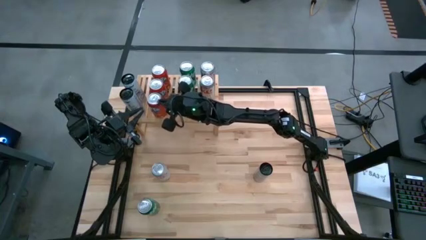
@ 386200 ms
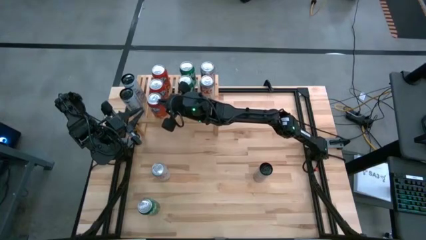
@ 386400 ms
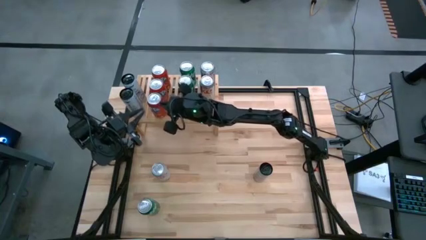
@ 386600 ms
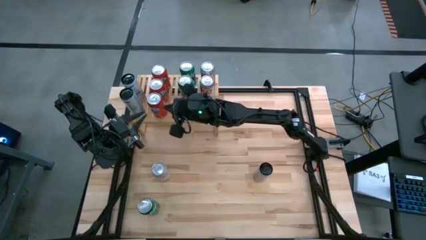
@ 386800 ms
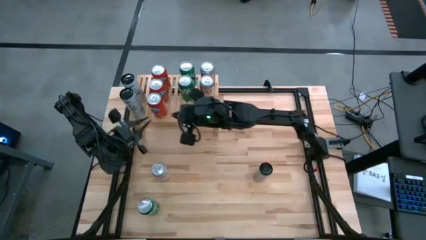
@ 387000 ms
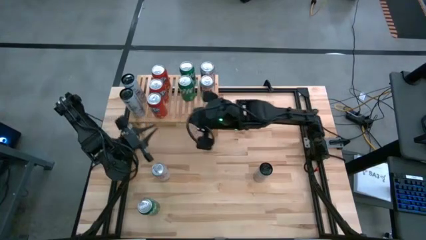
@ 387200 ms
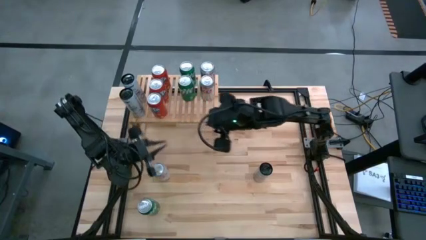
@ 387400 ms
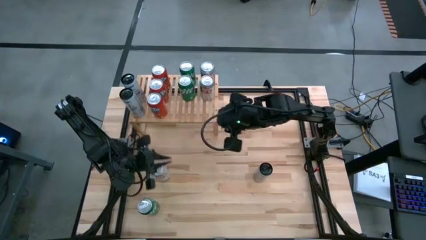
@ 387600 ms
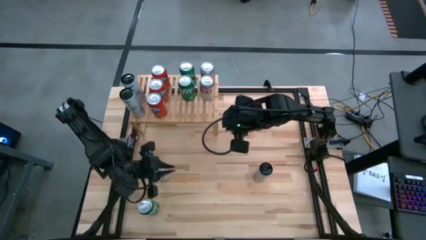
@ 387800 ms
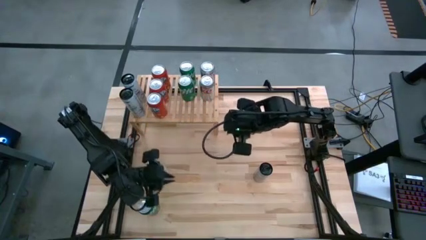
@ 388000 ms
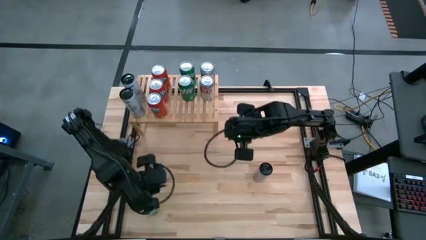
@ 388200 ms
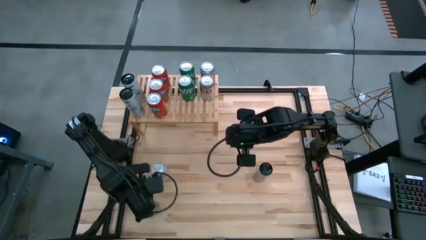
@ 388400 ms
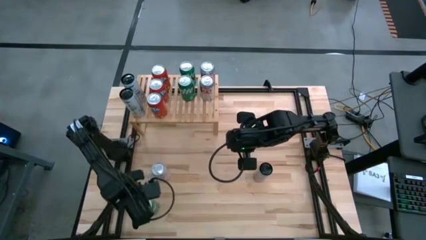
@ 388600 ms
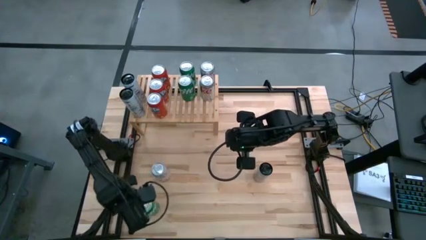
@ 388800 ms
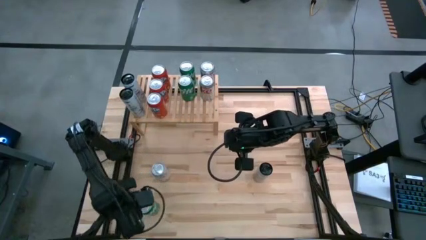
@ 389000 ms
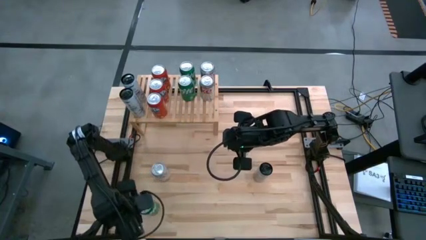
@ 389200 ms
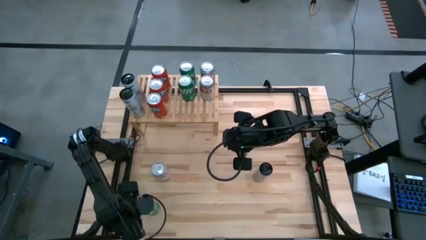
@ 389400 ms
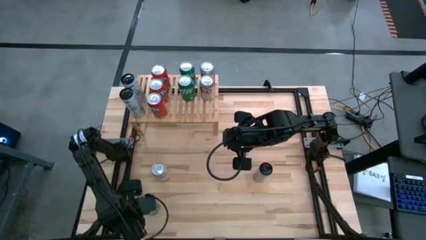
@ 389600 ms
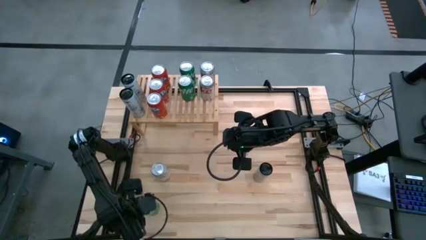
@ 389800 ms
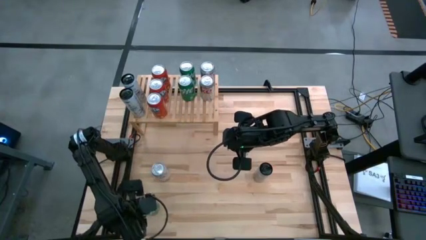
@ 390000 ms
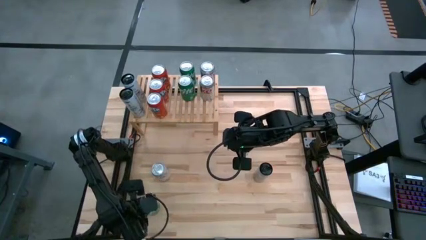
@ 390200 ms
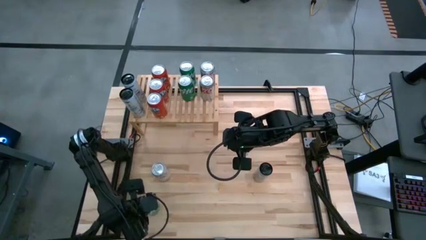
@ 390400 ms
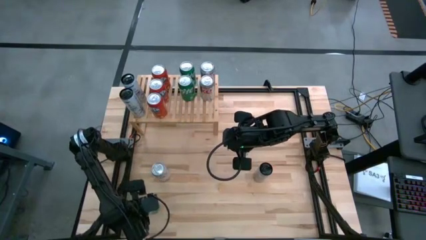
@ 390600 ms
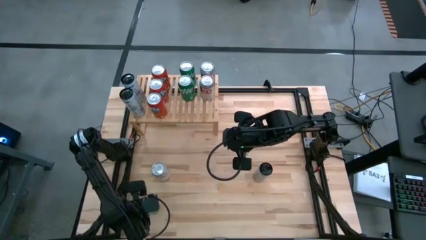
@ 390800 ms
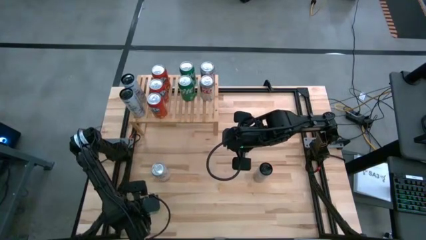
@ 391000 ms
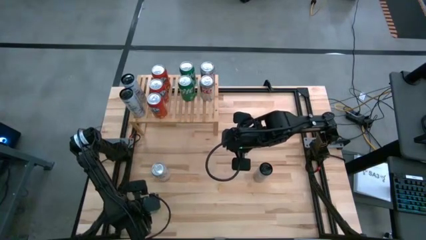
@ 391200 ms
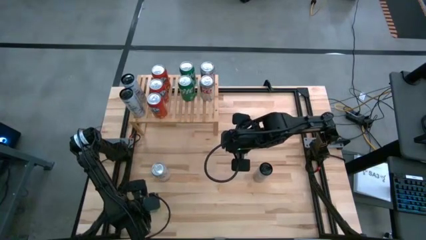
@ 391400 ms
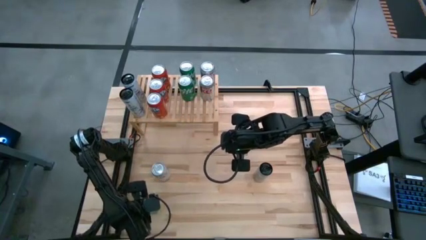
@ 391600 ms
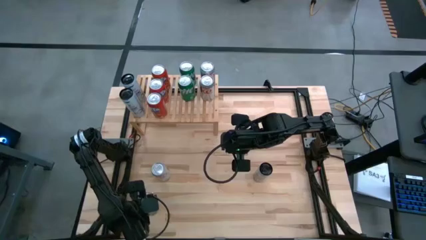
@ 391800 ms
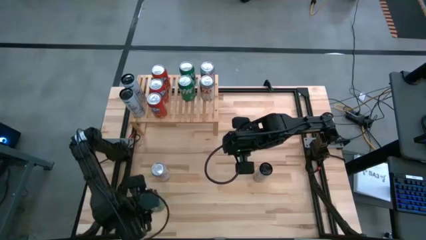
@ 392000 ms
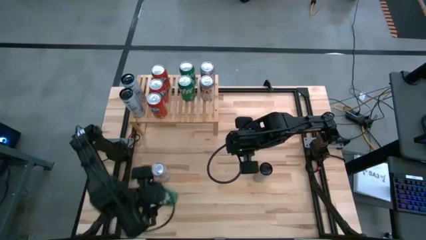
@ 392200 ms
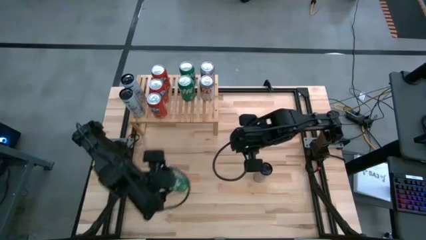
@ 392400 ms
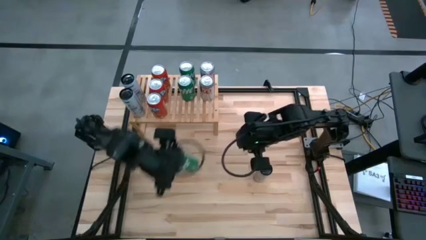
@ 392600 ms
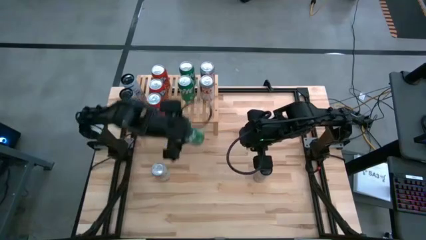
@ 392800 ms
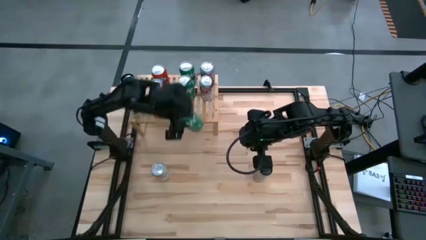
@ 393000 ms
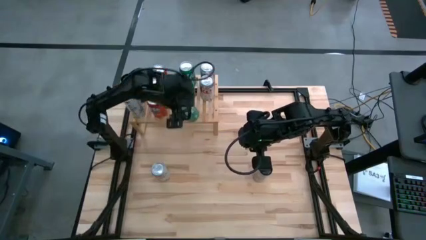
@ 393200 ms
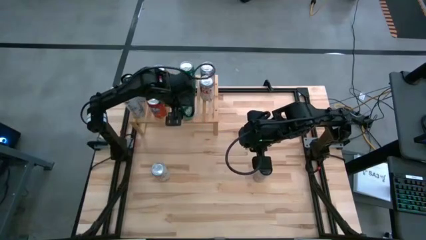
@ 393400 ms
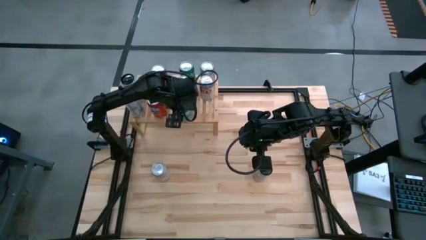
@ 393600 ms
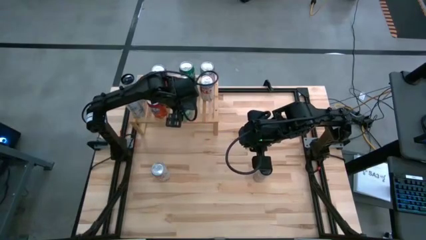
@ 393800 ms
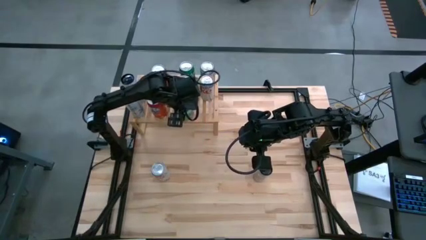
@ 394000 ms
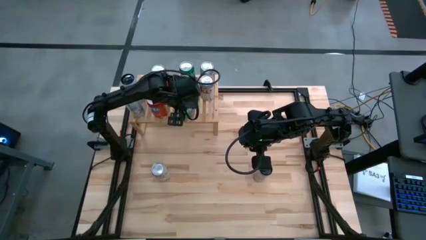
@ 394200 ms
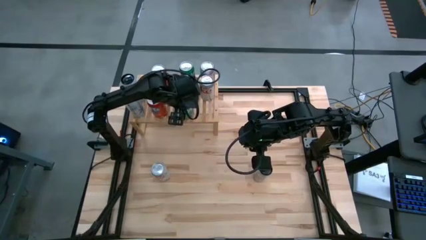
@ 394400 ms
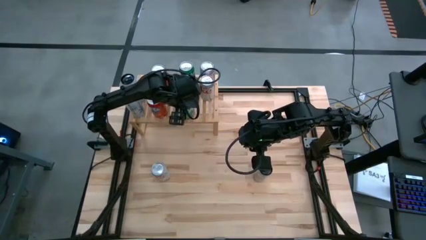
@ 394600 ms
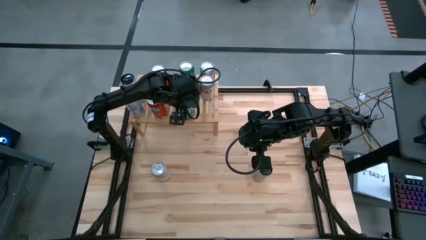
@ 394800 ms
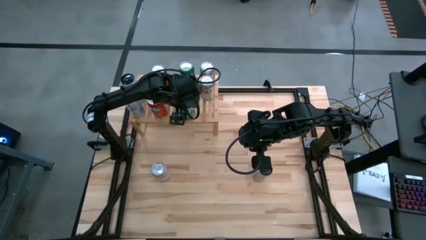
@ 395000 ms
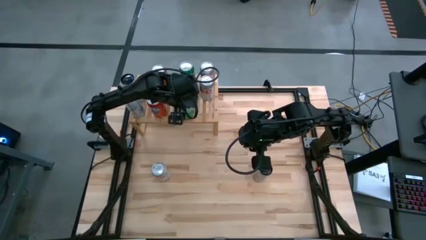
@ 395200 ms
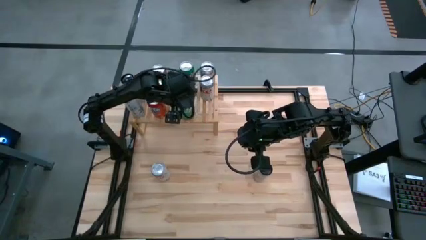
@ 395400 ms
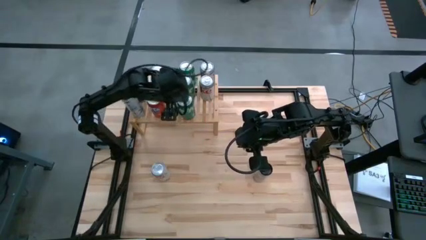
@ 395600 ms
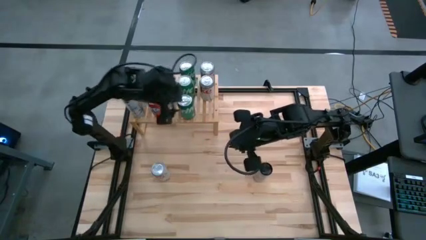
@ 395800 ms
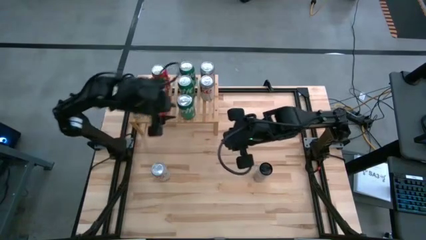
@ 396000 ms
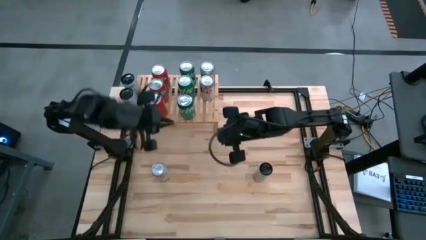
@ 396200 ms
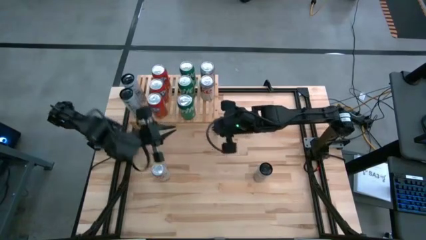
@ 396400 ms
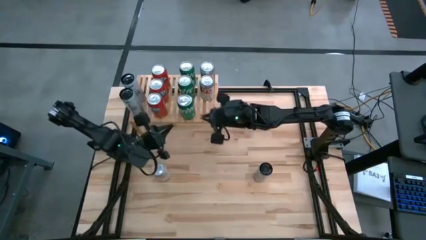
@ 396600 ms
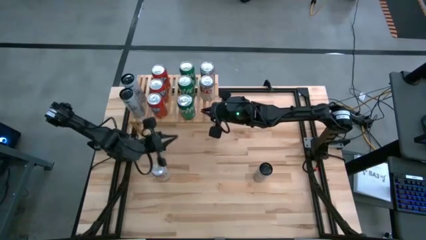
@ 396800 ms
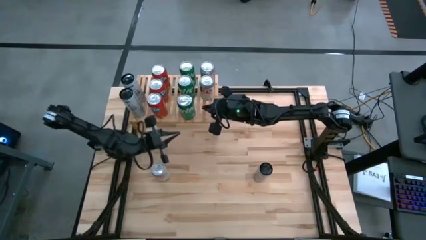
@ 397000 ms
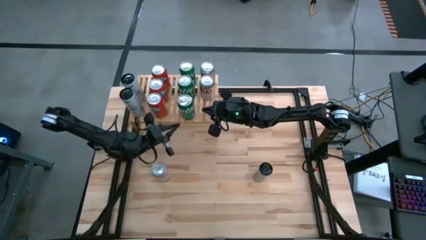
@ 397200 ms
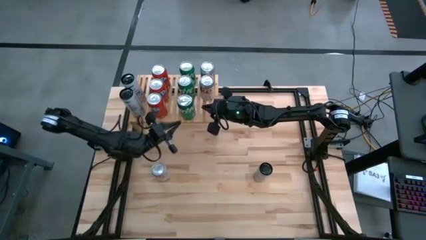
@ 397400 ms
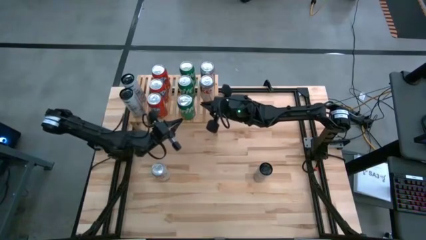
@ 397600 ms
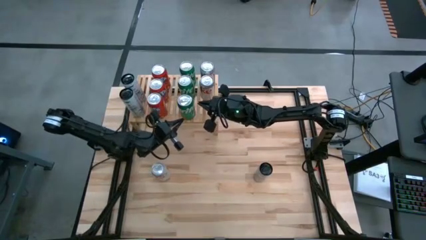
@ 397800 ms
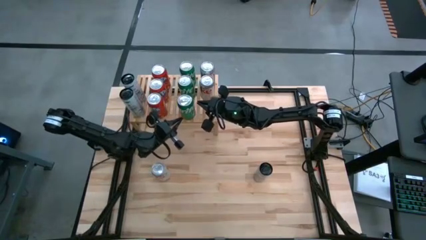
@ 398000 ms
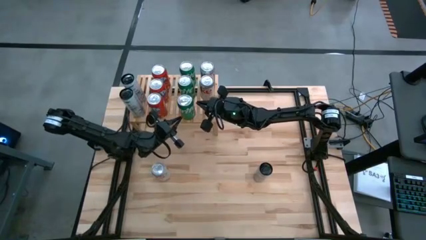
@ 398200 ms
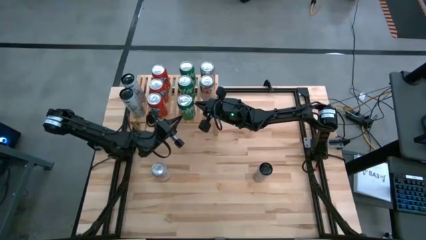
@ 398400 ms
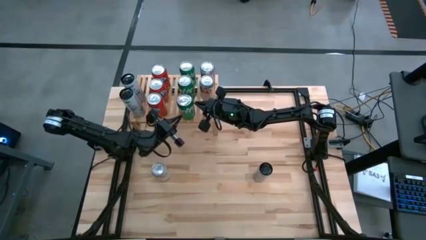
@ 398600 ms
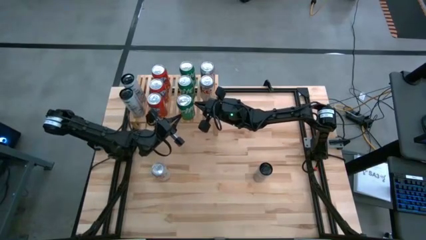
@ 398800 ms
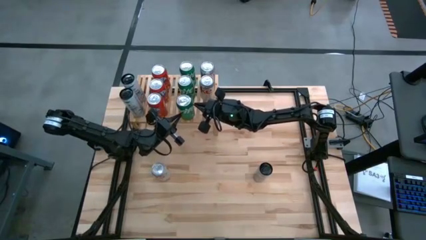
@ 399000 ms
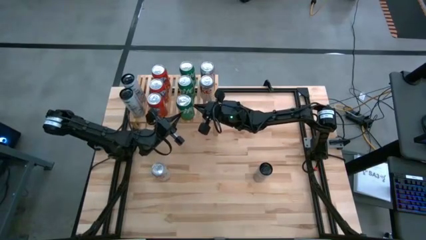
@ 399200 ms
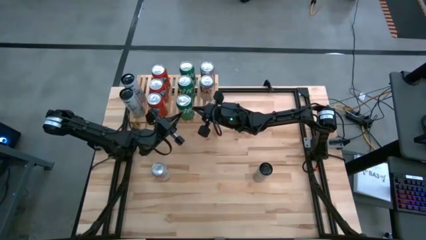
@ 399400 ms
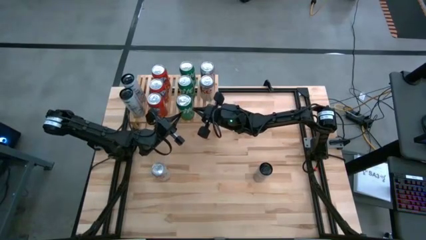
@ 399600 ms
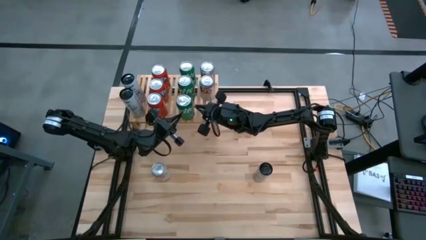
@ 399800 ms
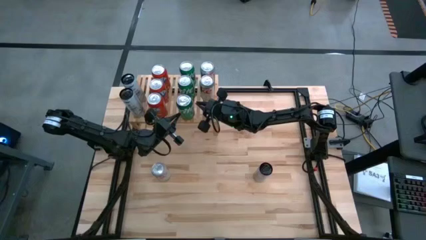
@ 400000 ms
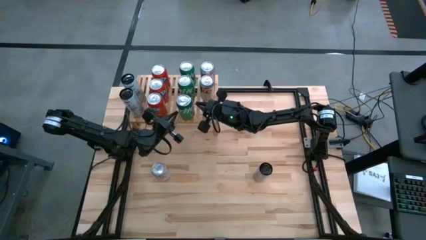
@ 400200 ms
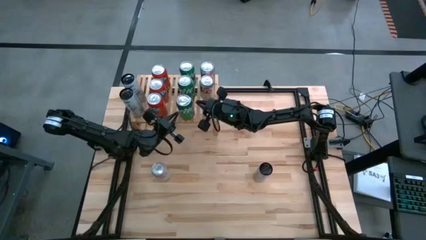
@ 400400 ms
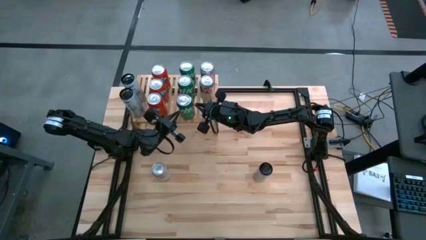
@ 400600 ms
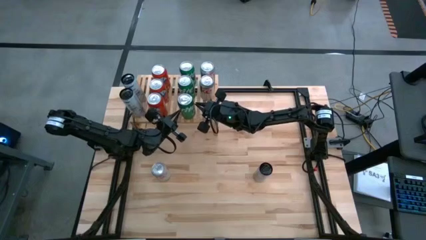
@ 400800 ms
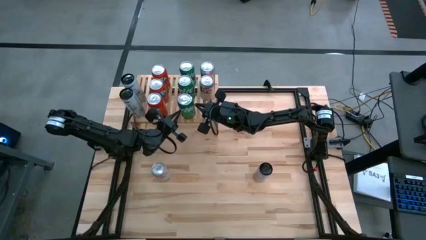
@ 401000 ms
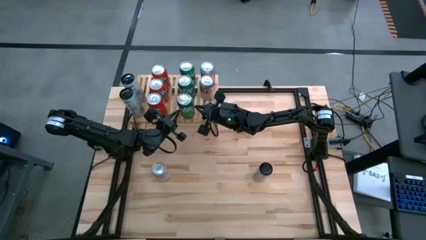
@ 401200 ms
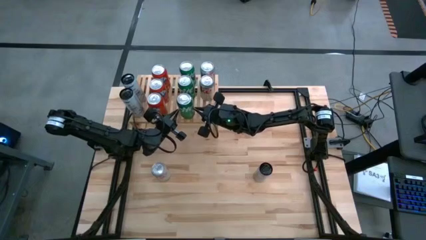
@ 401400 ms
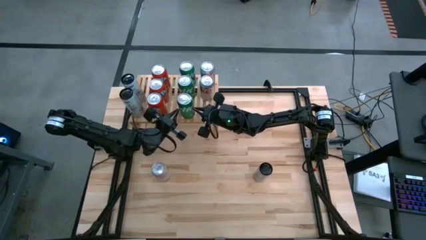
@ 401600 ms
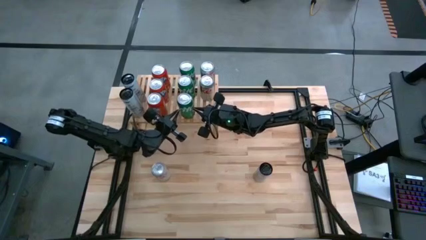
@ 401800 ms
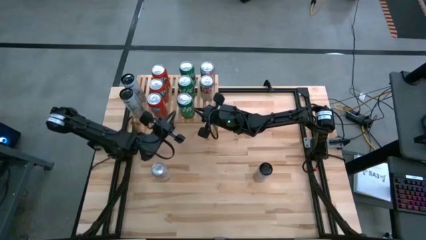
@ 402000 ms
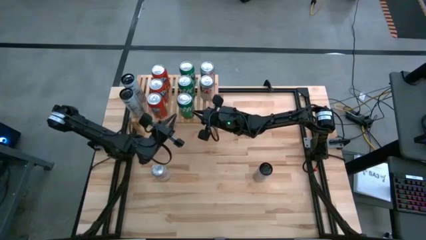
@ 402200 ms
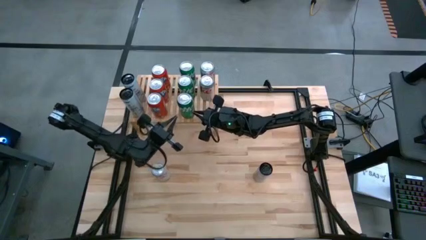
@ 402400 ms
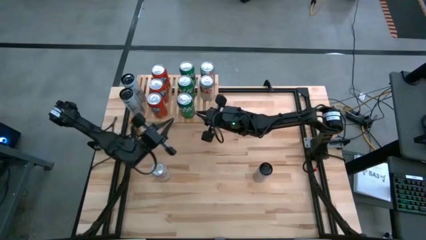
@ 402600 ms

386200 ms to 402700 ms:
Task: Place canned beverage on shelf
Put the green soda can on the shelf aligned with the other green soda can
